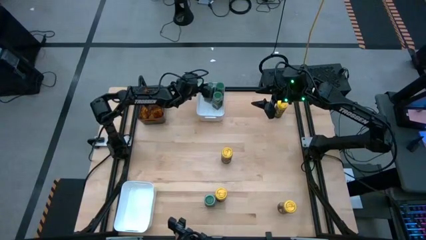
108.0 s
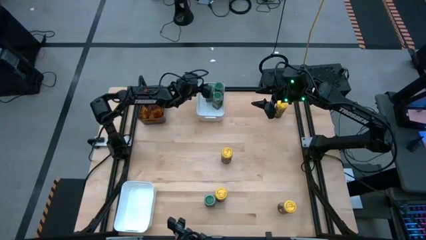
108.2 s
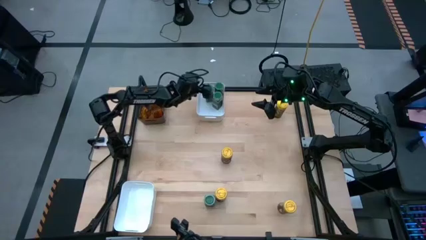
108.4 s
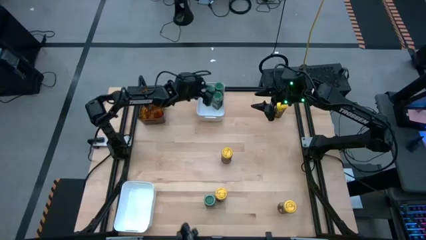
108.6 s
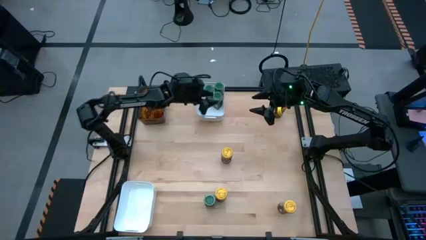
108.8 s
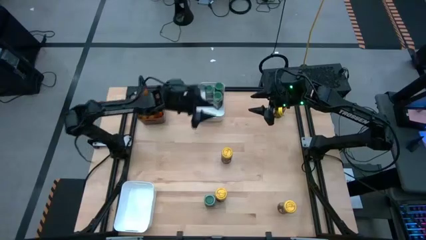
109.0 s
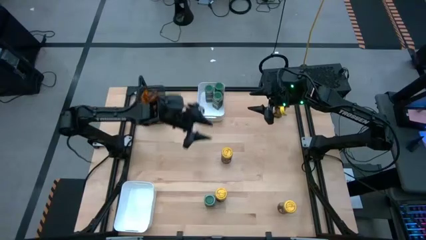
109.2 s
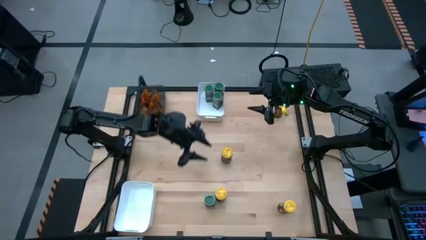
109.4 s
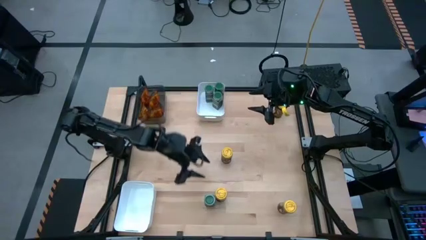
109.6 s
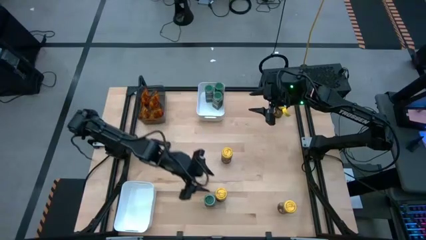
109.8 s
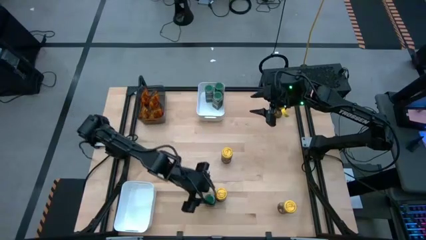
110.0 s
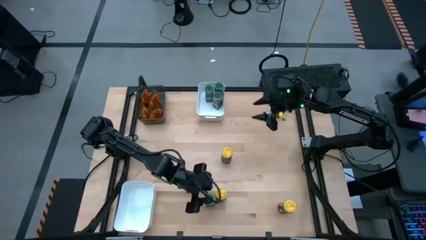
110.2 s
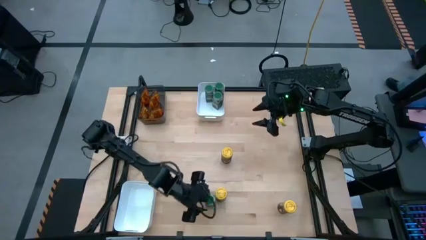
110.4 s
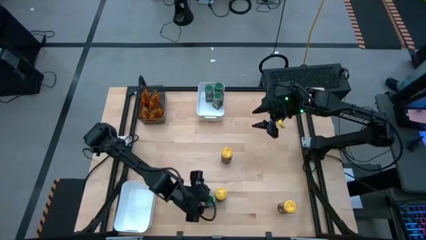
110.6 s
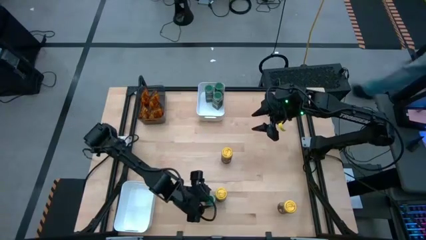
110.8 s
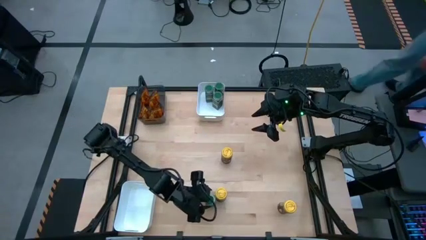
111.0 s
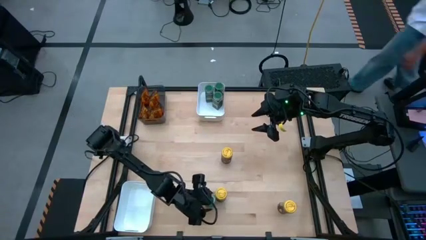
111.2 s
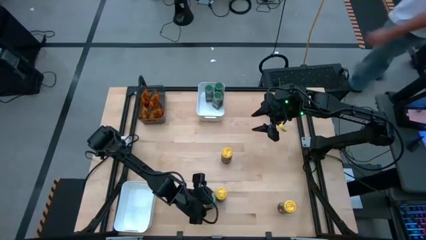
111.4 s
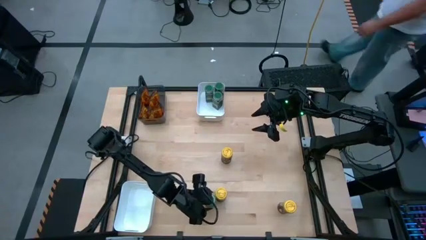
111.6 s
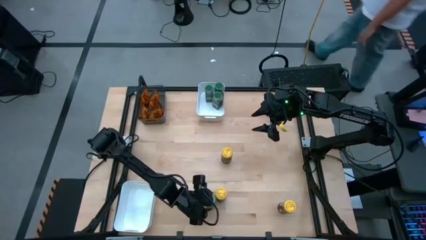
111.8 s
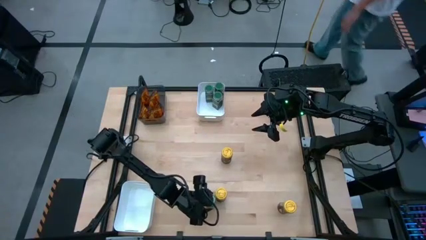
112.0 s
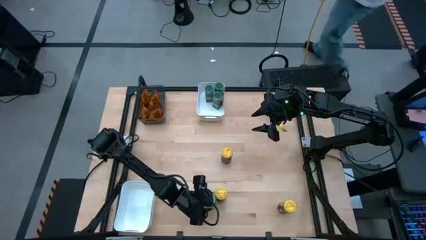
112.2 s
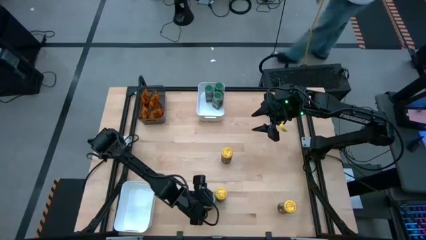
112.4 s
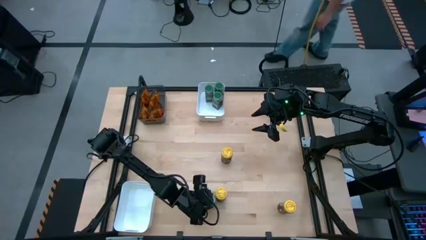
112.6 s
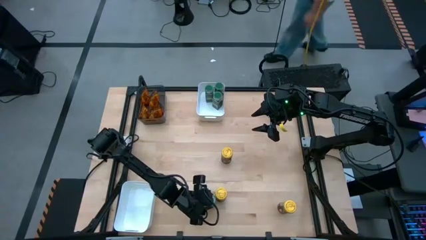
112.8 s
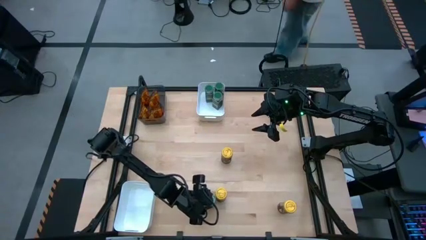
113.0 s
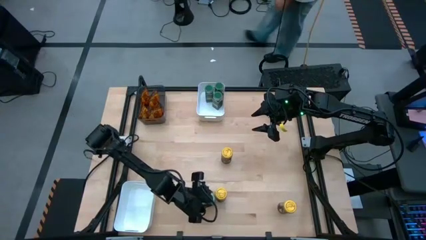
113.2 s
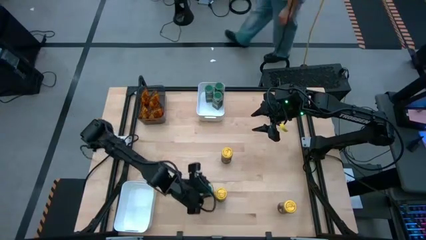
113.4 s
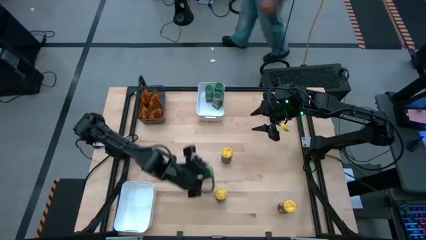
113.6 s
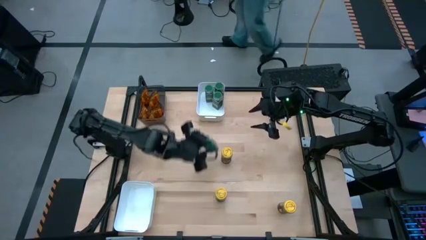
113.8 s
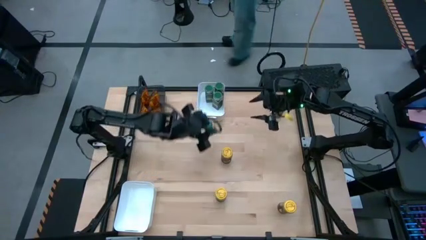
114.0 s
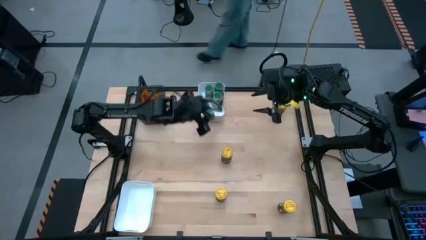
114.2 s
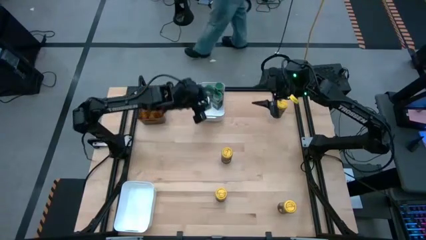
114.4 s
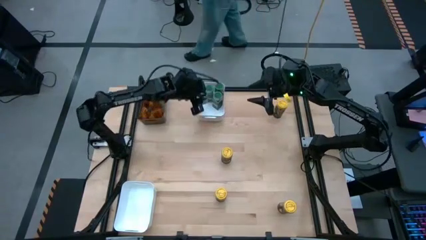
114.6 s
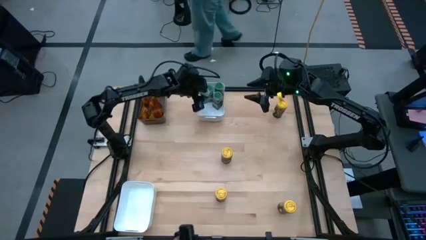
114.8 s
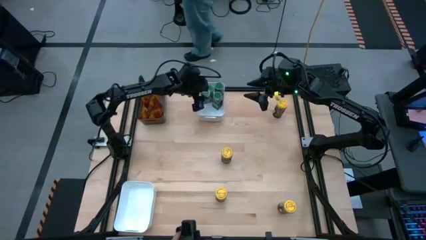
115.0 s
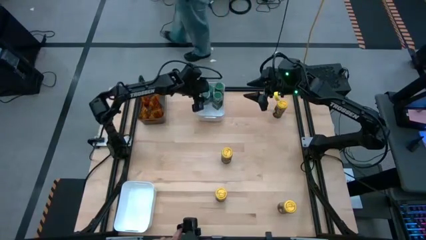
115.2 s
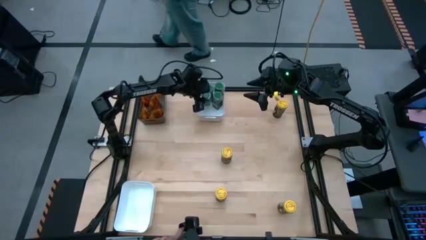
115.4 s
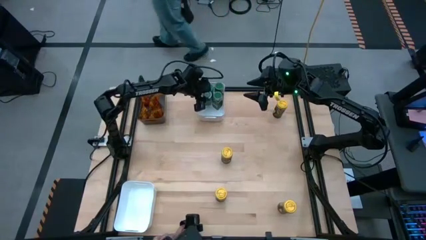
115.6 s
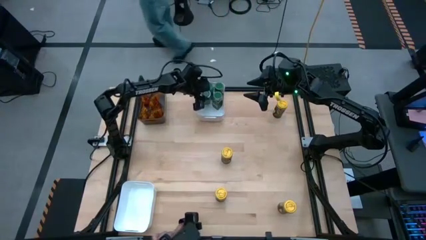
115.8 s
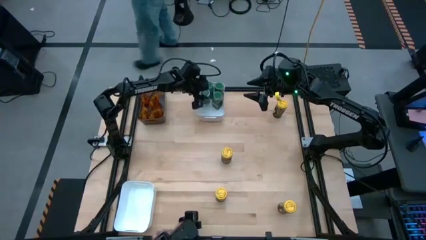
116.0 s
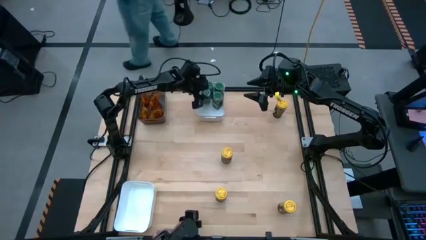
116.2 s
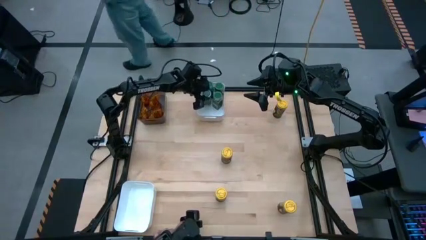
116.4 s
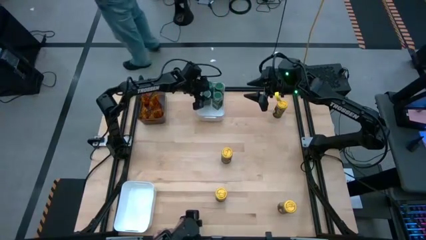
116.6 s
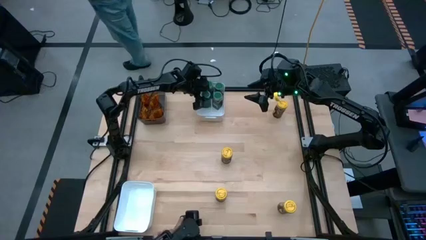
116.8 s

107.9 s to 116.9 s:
Task: Sort spices by type
Put the green seasoning bottle into the top white bin

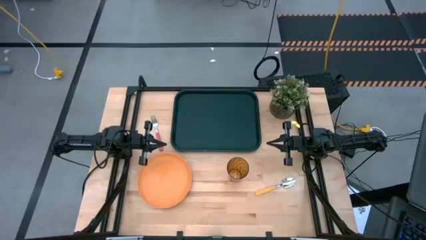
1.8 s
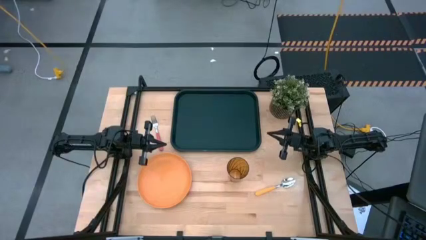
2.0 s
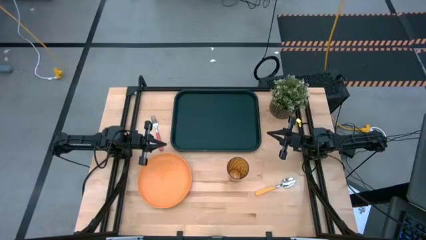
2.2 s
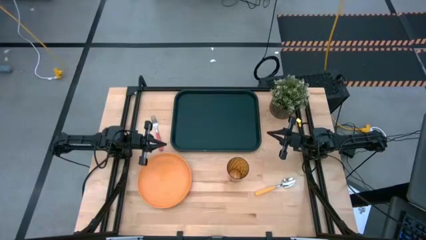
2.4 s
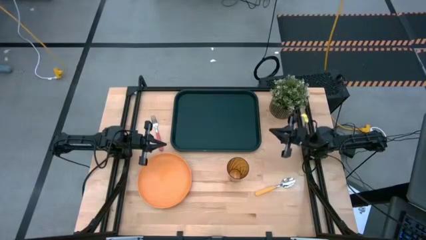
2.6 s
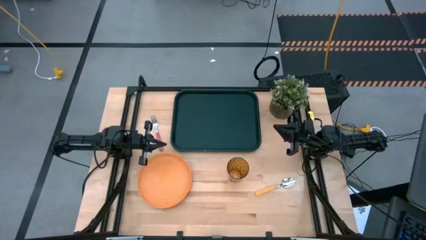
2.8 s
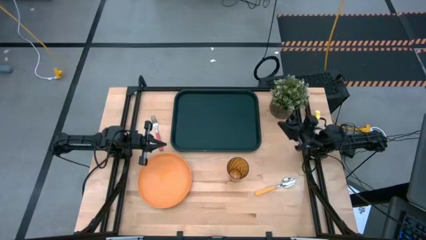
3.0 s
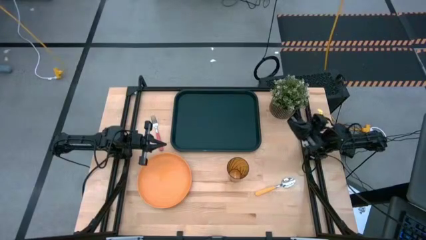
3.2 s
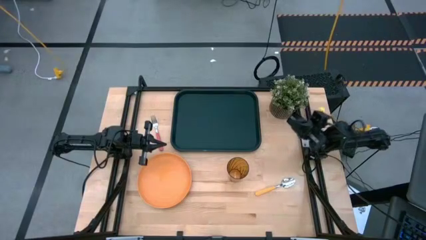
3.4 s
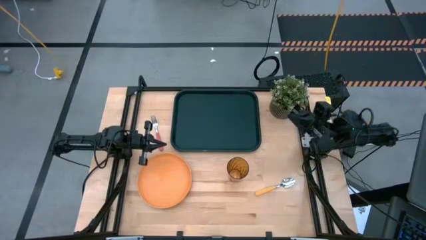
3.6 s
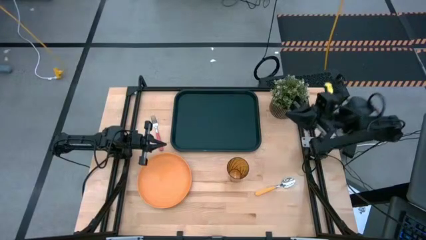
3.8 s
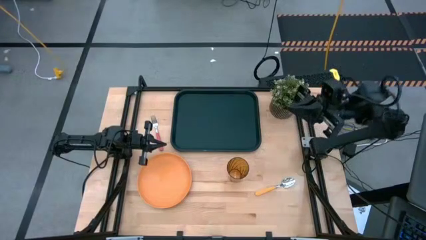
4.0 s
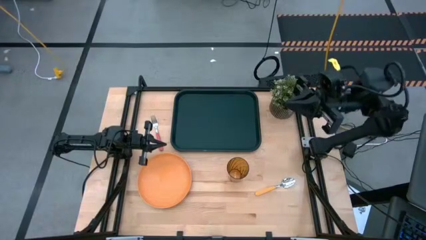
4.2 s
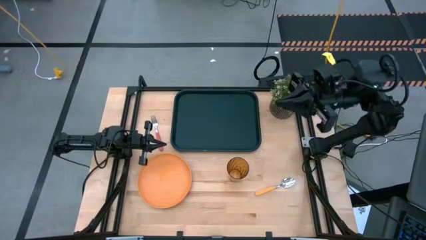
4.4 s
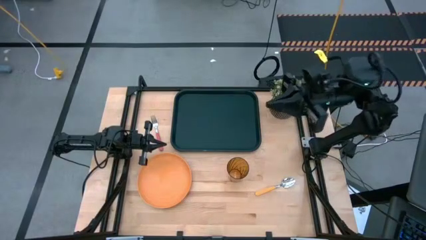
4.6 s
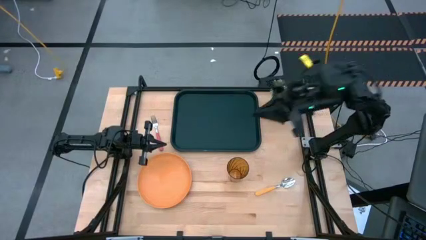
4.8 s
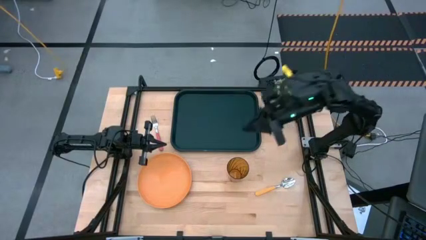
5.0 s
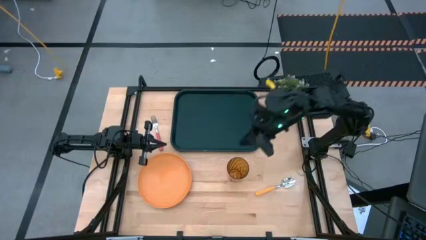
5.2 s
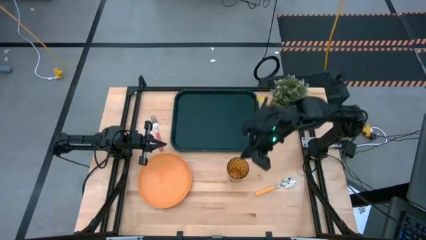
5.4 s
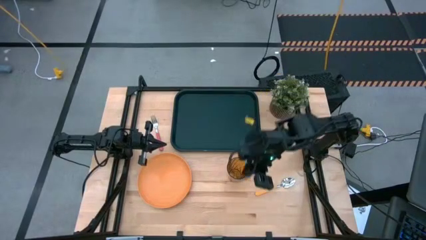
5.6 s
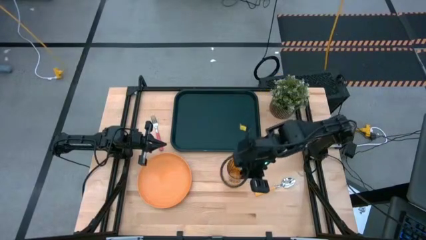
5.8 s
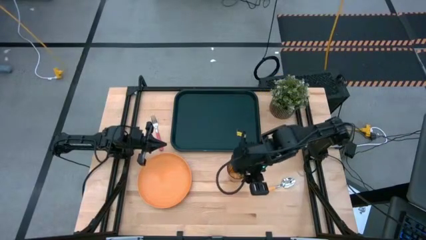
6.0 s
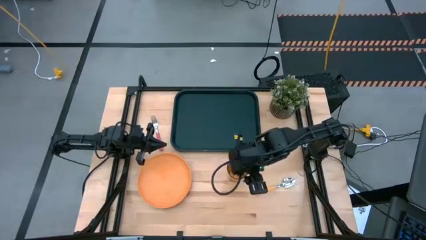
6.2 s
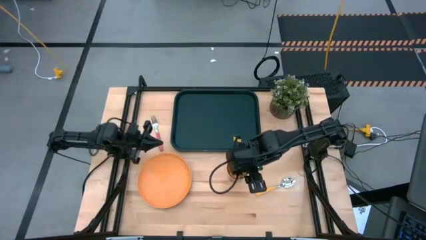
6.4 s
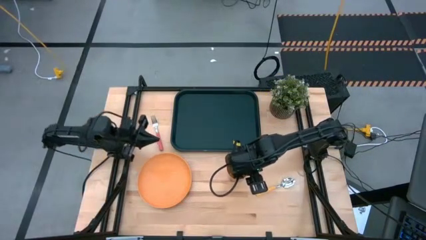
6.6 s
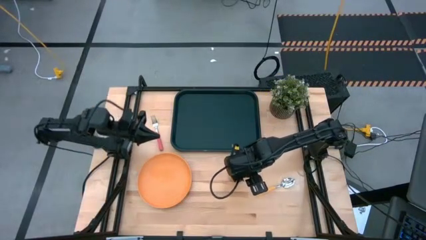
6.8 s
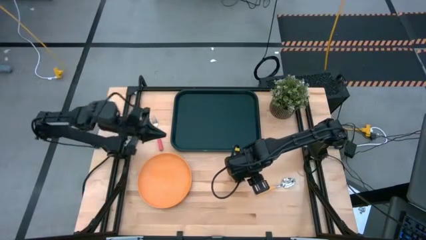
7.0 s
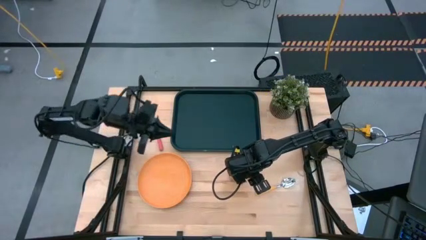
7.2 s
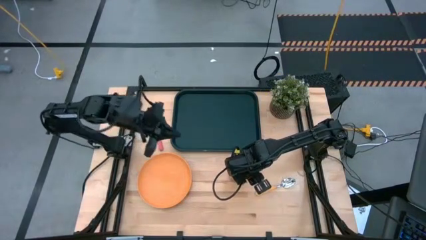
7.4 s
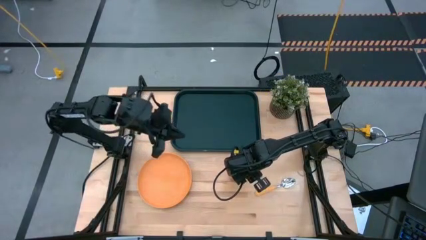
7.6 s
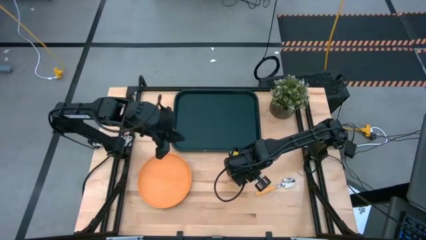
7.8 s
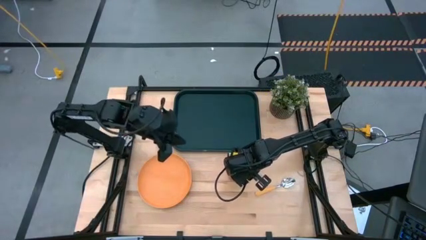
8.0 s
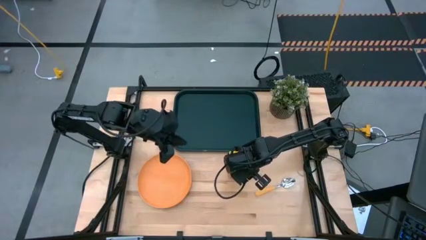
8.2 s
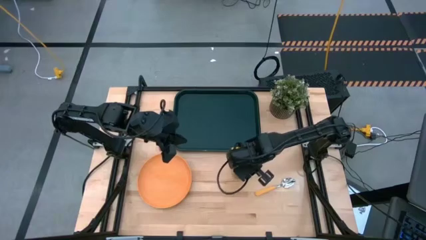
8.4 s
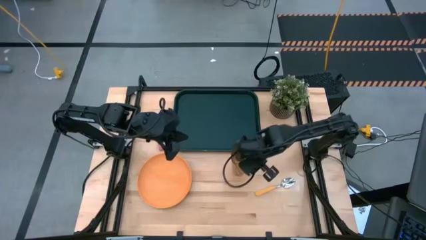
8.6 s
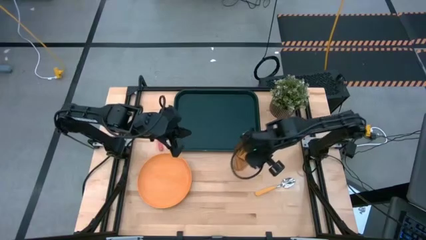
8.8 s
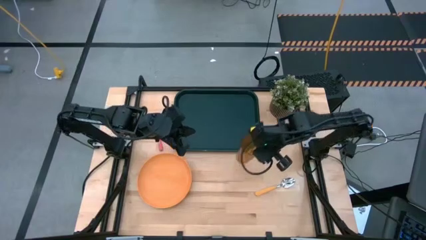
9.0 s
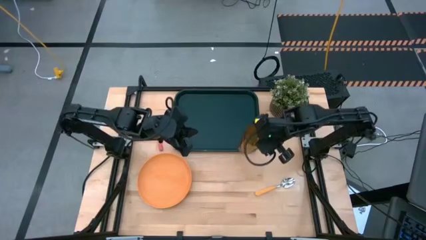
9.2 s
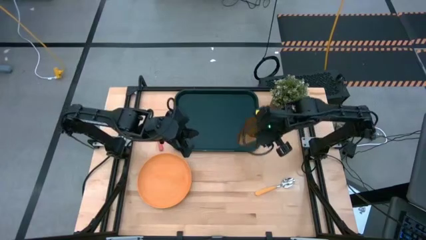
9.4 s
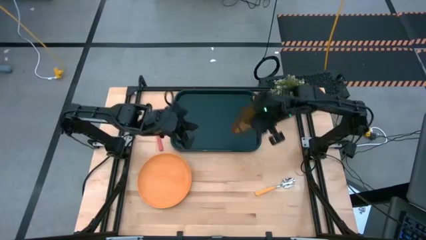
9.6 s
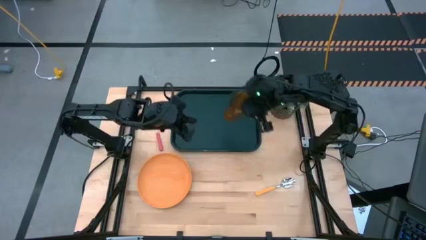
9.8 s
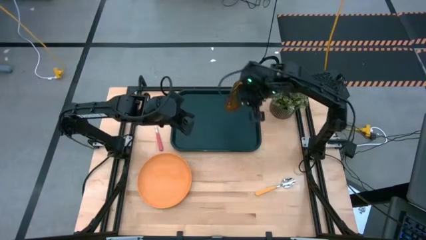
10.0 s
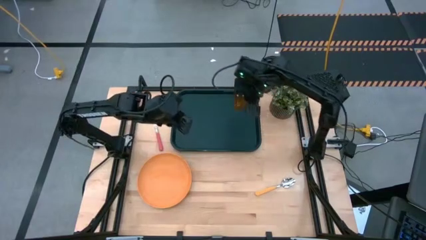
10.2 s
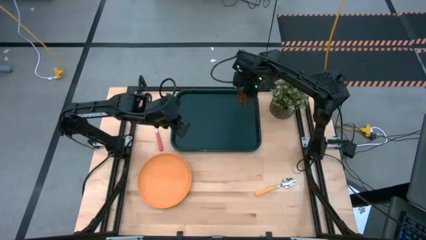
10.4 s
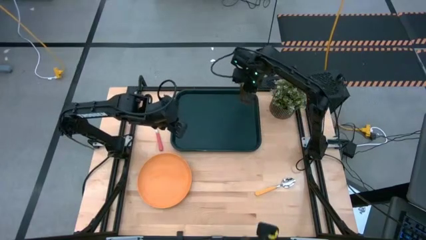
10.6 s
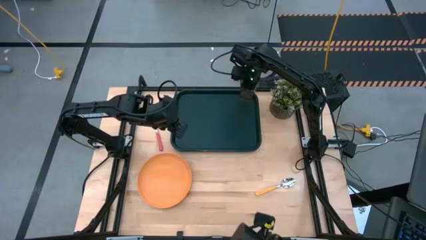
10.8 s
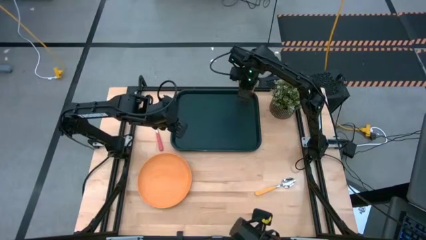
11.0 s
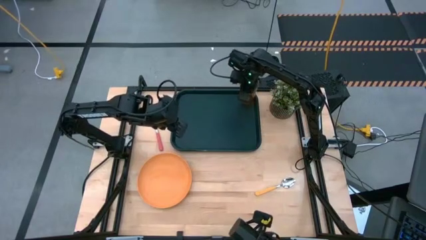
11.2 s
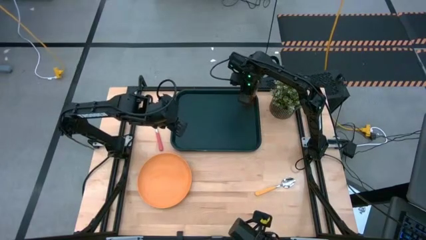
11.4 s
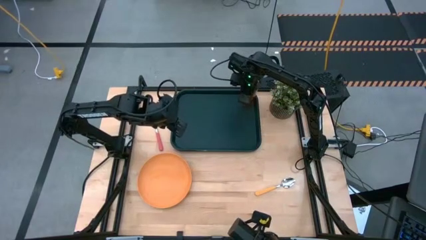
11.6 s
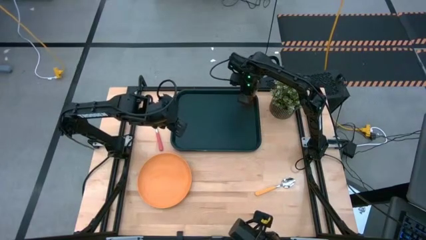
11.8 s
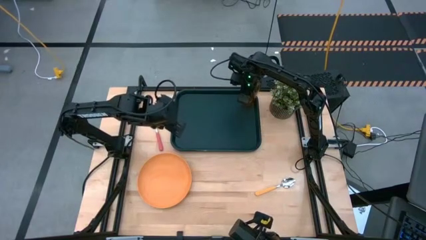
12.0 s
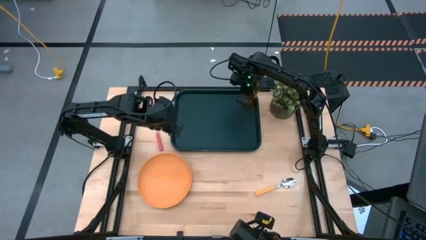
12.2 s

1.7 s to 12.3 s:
Task: Pick and place plate/cup/fork/spoon on tray
Put the brown cup on the top right of the black tray
